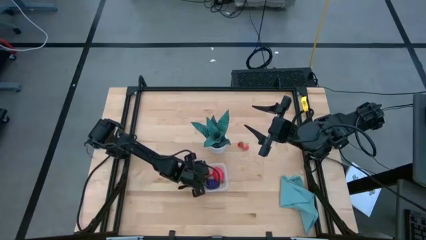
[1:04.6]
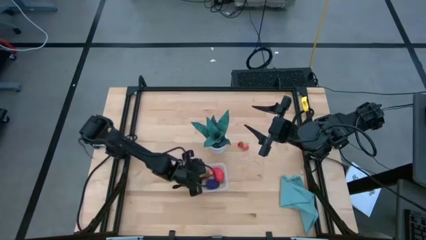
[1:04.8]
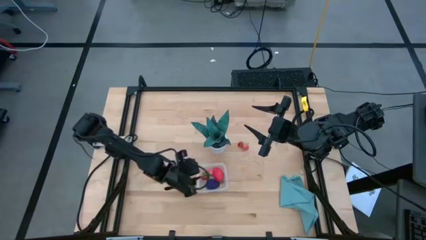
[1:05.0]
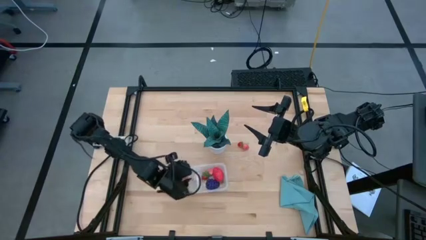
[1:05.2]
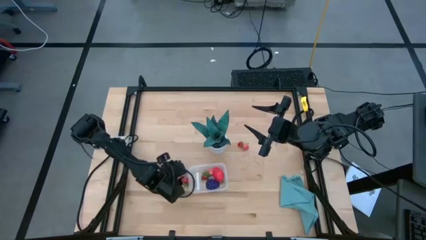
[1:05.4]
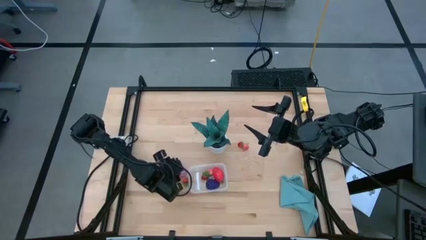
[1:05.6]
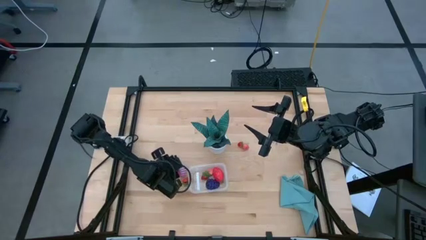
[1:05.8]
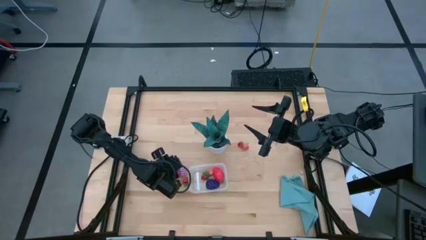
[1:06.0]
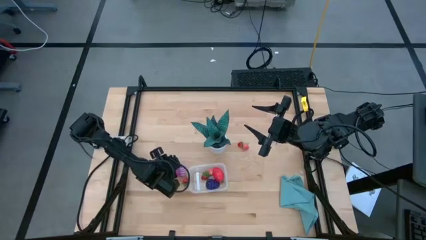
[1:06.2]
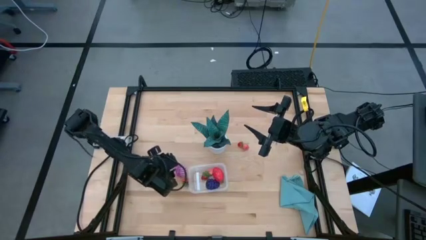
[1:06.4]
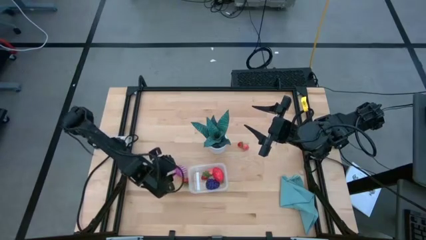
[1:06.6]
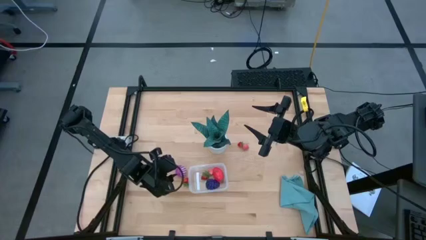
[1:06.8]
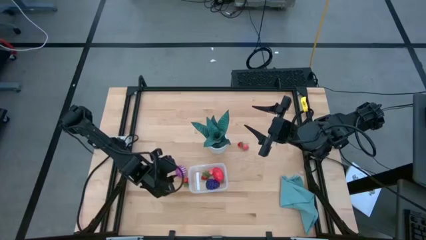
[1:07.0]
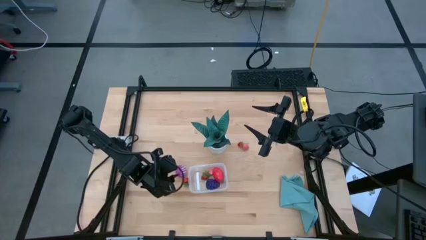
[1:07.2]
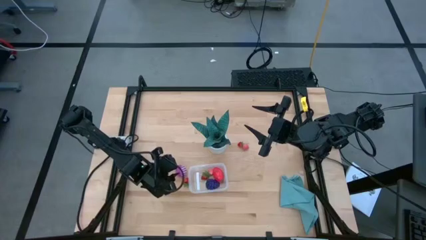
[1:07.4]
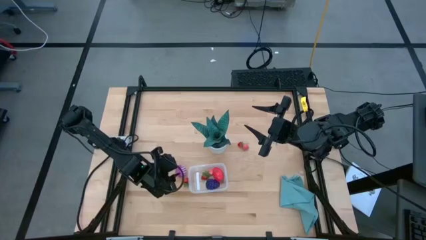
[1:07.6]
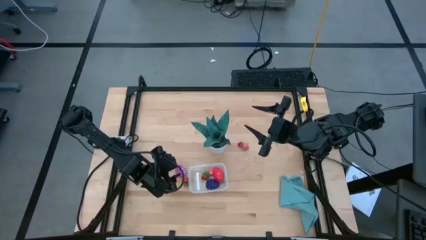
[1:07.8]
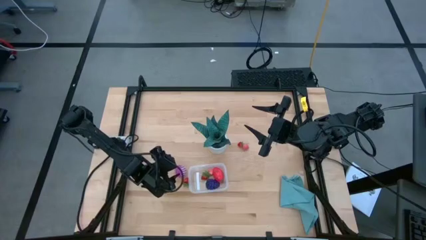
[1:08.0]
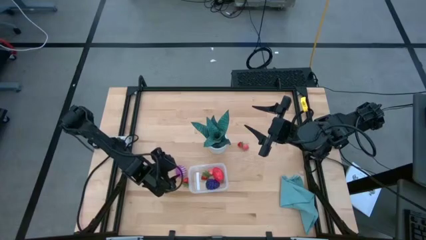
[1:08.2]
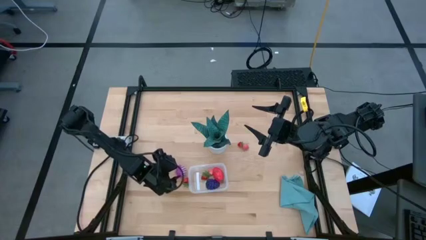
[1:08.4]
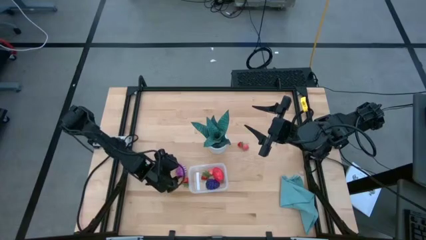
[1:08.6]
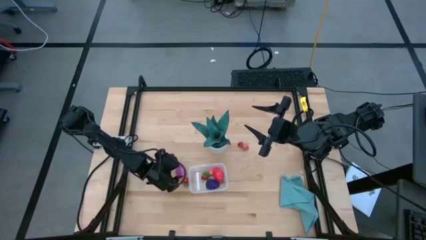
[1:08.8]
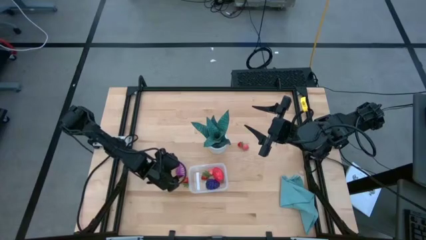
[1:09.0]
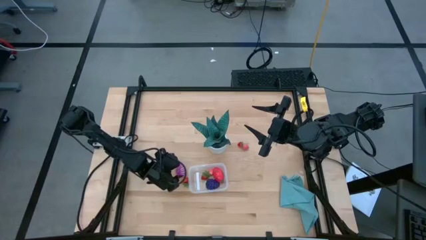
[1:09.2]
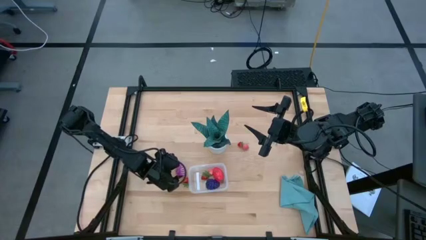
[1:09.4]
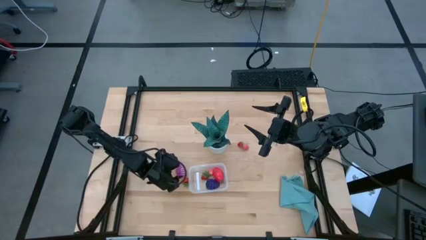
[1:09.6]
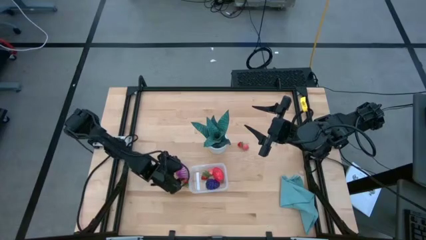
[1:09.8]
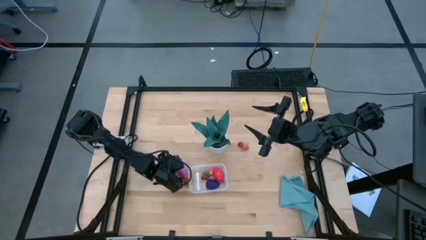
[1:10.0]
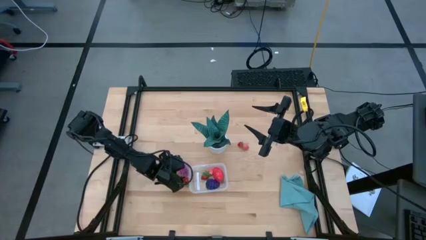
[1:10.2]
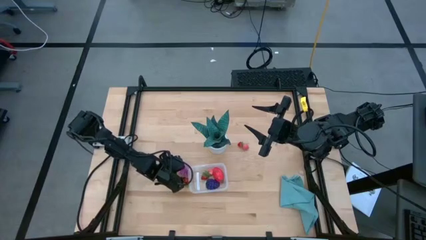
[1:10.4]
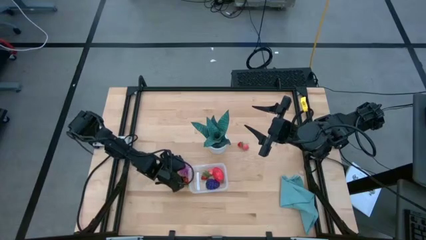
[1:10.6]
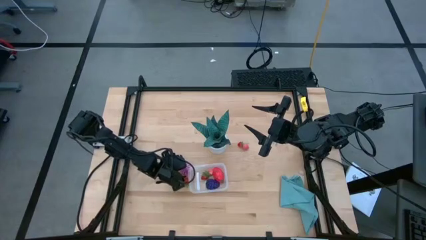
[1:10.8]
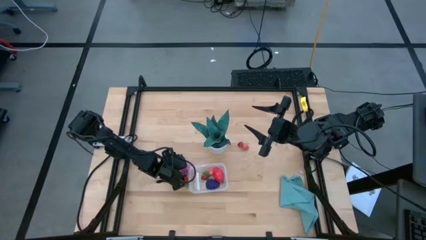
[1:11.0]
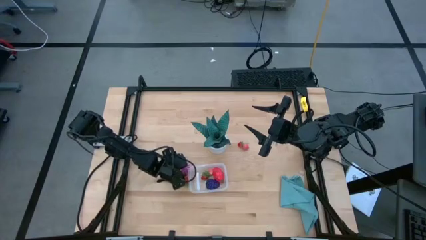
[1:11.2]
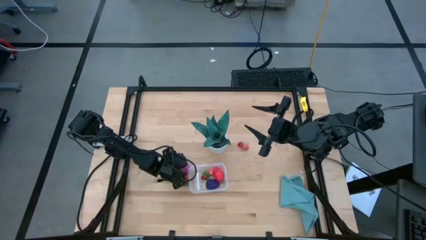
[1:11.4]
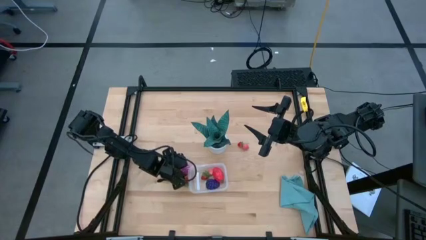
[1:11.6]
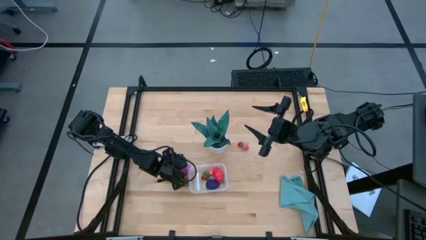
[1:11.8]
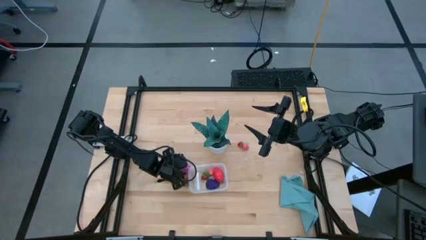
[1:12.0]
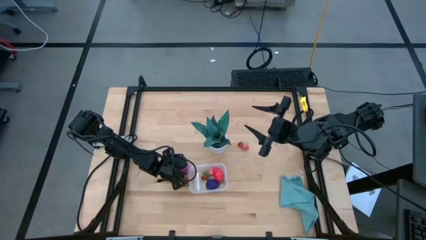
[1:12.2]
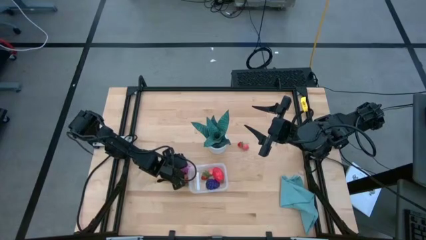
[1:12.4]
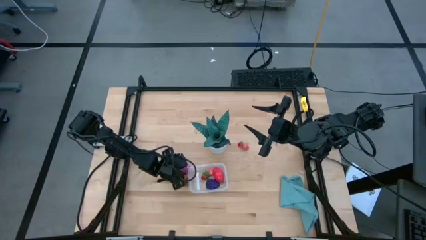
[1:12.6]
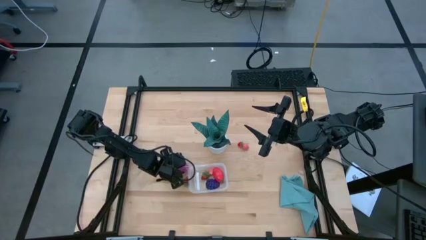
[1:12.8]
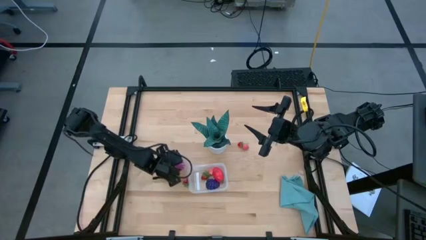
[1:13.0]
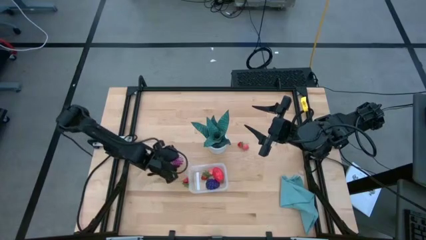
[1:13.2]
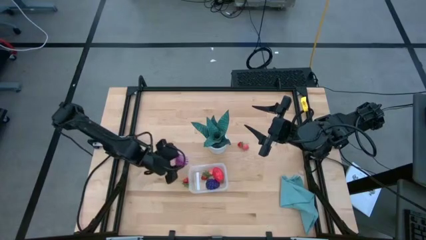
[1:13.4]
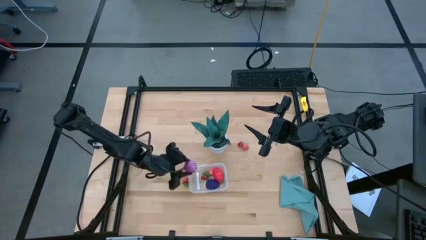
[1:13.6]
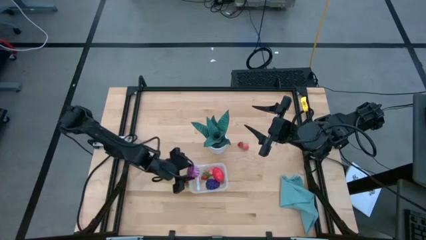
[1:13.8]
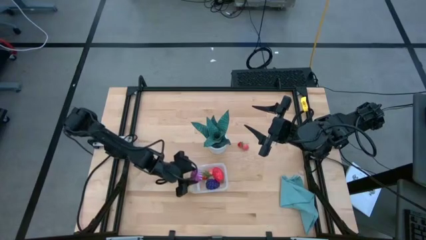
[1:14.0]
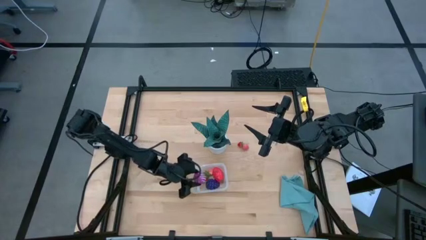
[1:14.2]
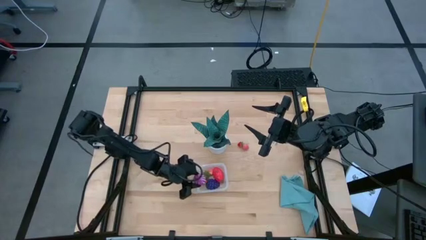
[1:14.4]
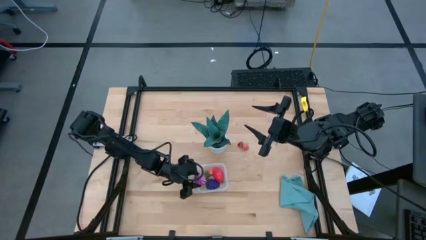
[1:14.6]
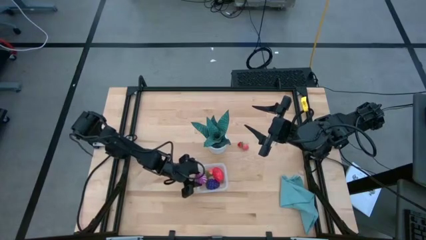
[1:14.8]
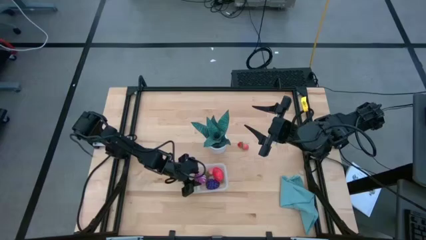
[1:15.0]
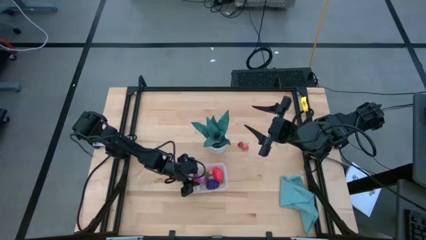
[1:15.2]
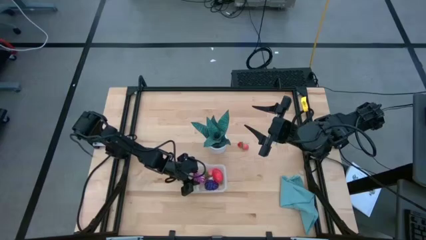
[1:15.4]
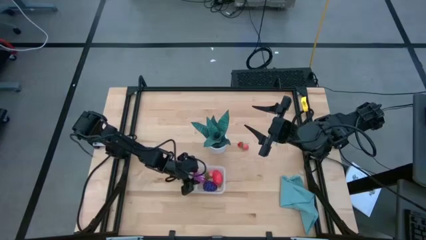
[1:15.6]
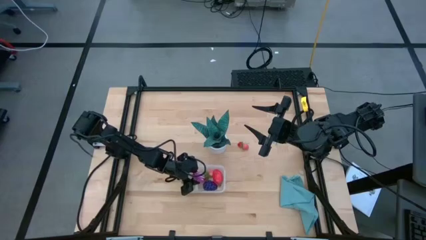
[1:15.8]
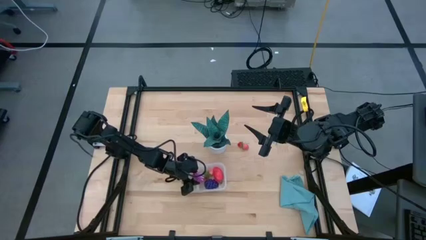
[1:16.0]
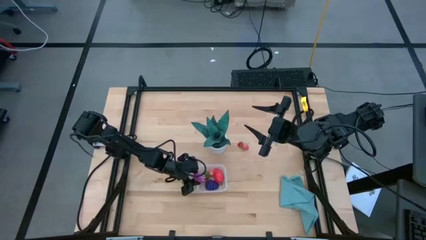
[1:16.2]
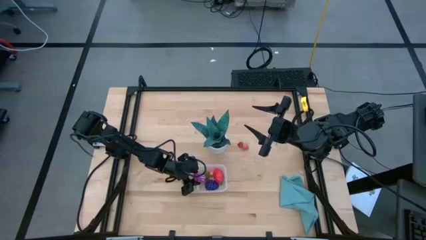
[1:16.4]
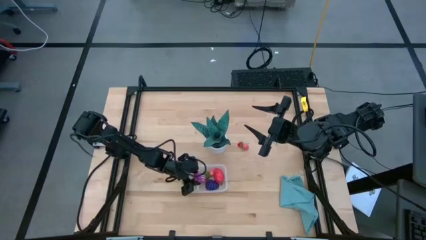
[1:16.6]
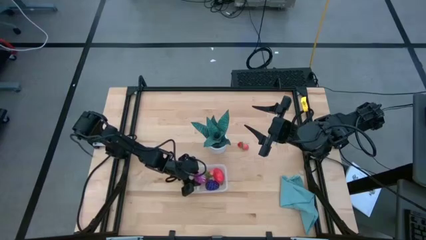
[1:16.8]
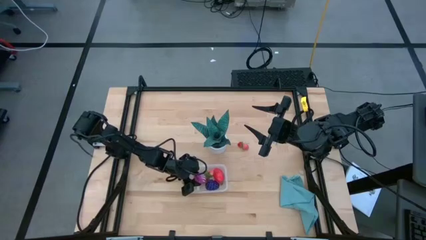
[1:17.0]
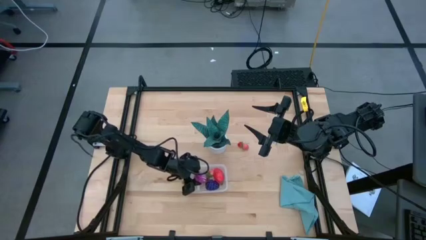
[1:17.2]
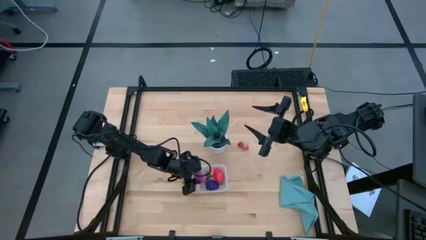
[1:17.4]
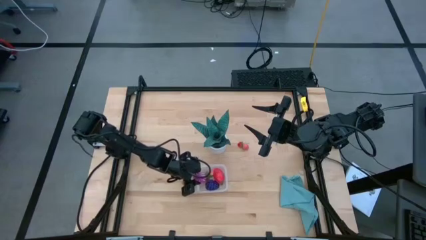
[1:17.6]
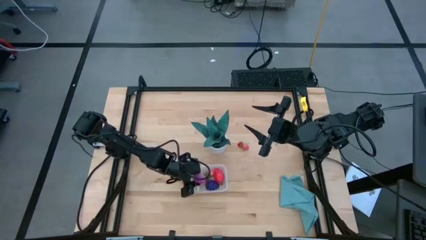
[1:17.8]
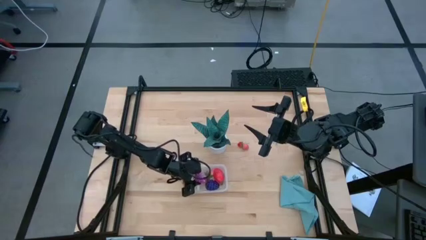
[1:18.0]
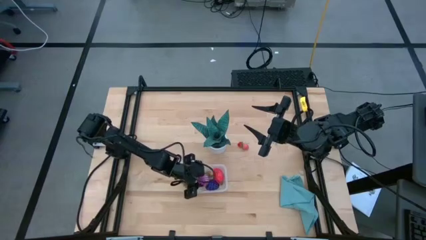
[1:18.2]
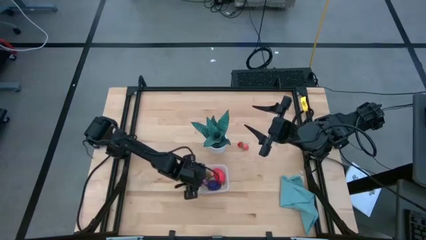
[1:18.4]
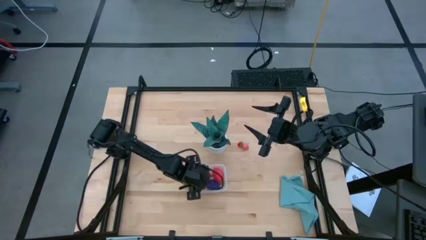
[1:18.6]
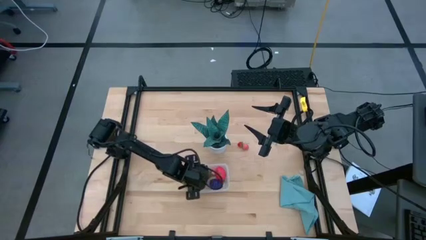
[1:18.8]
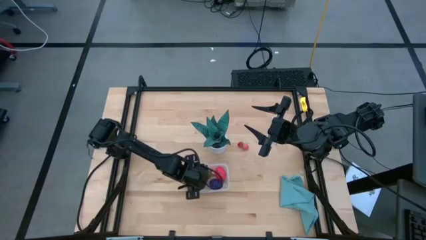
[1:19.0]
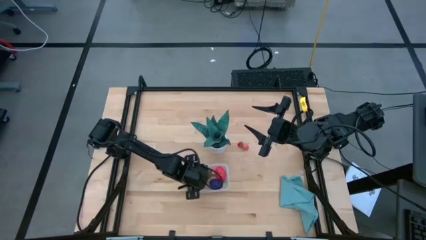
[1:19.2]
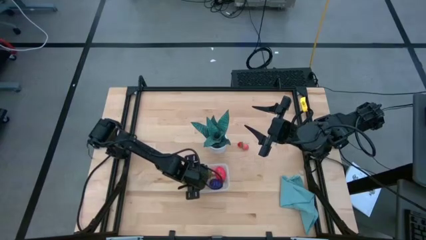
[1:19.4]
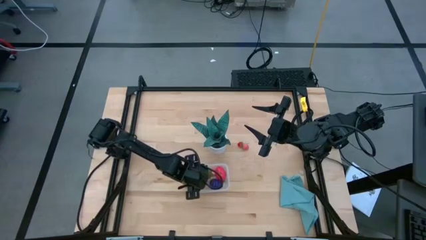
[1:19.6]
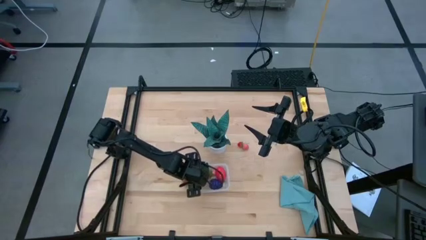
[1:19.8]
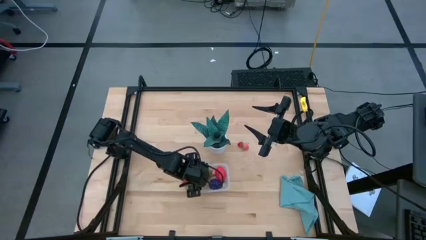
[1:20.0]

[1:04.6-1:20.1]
Task: Pick and placing Produce into tupperware
Put the purple onion into the transparent bin
